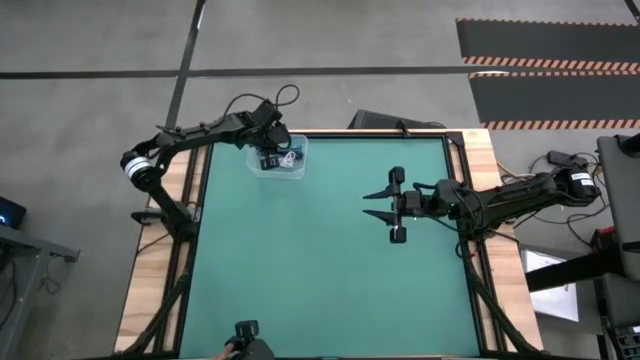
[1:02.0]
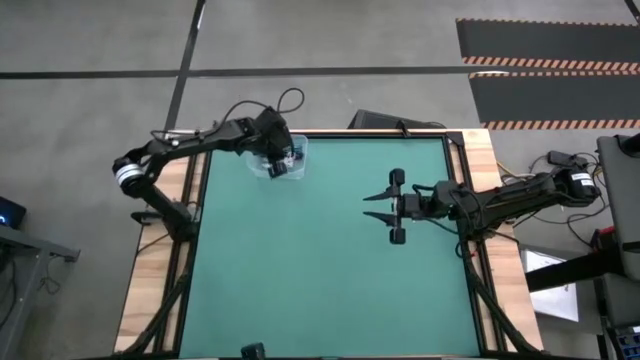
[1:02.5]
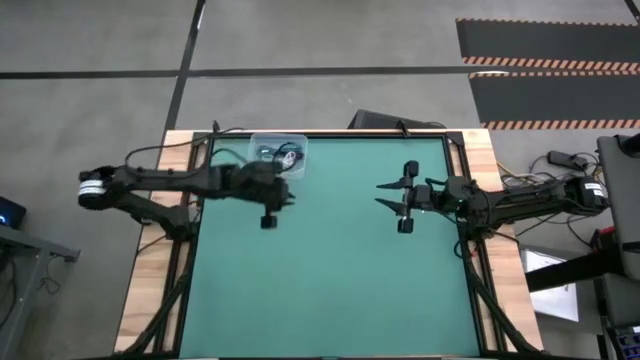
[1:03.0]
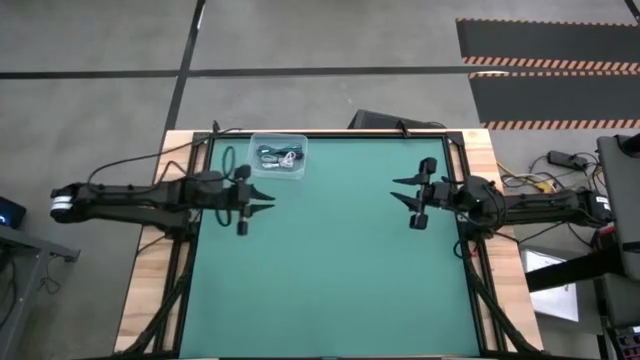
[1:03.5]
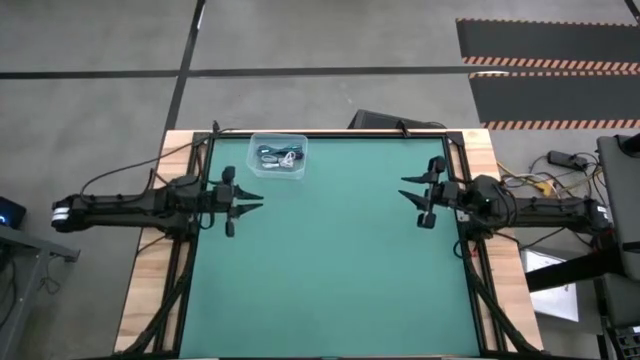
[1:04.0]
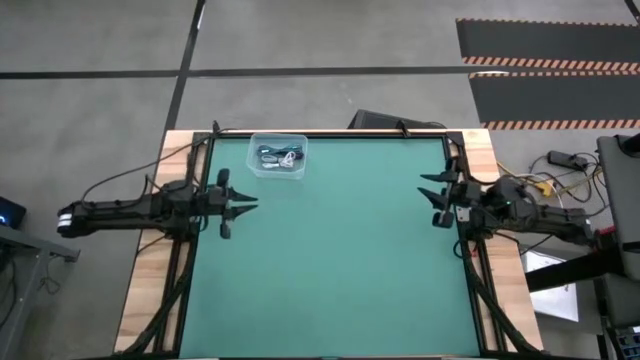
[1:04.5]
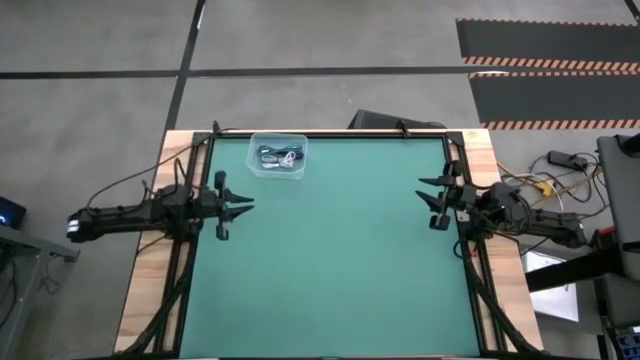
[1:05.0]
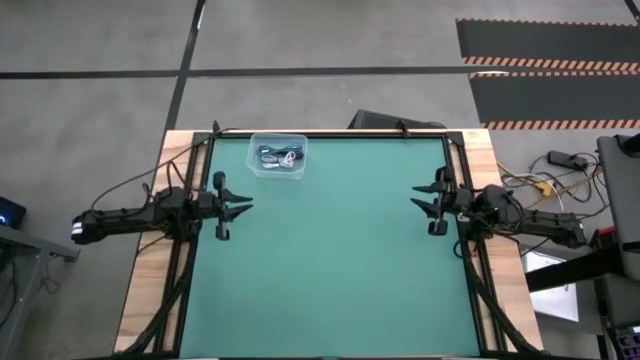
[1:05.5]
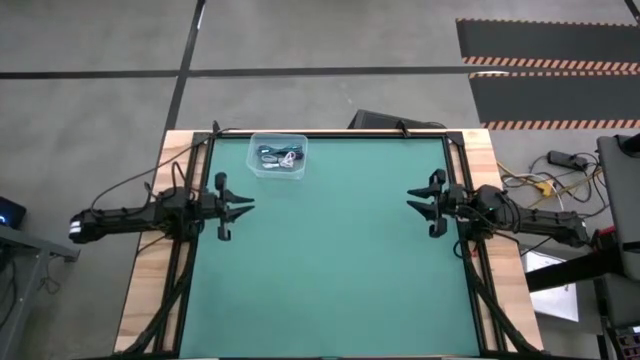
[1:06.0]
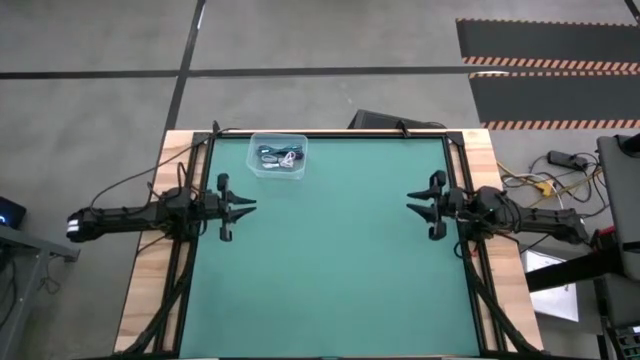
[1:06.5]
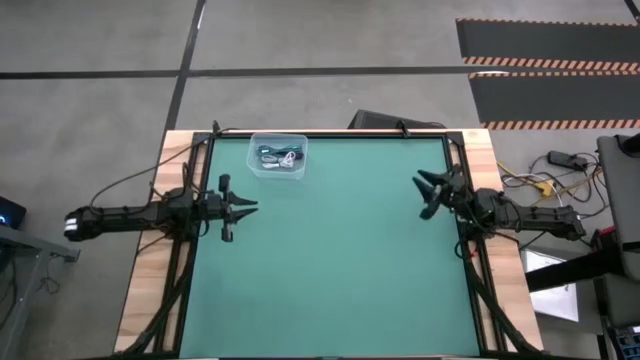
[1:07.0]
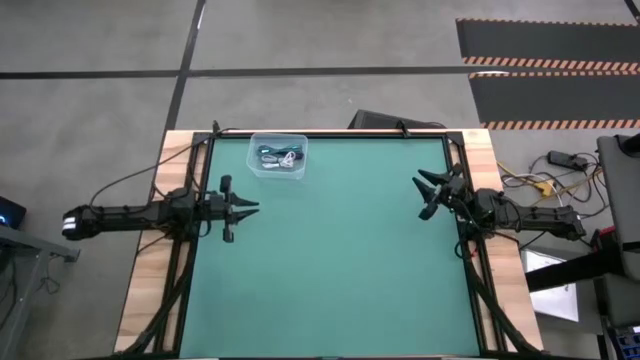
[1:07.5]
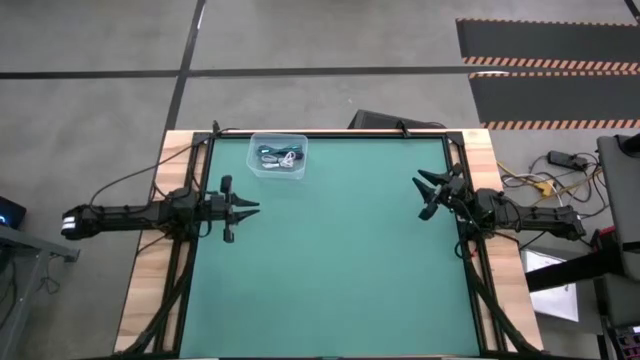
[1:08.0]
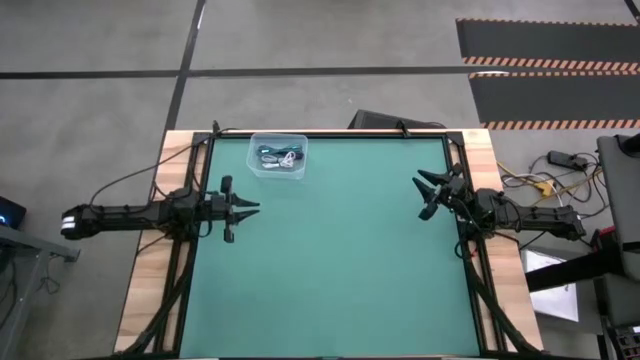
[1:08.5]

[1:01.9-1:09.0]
Task: Pick and place USB-C Cables
Return to Home Position

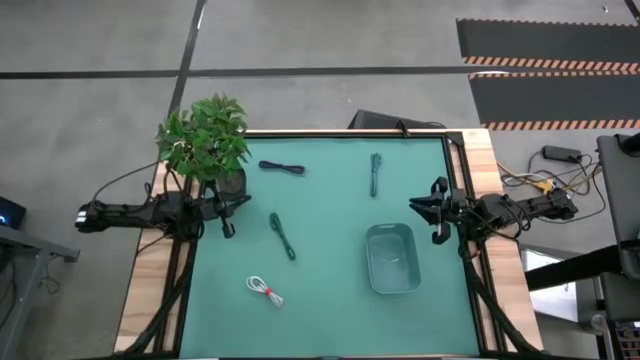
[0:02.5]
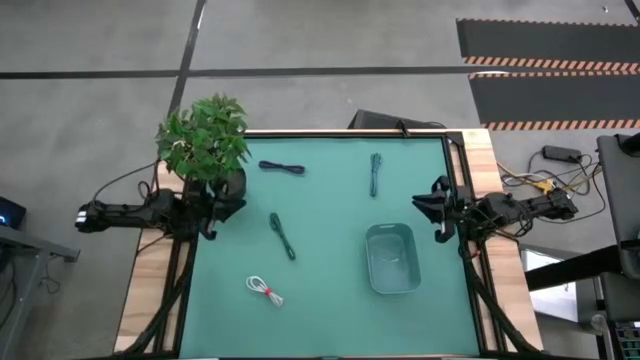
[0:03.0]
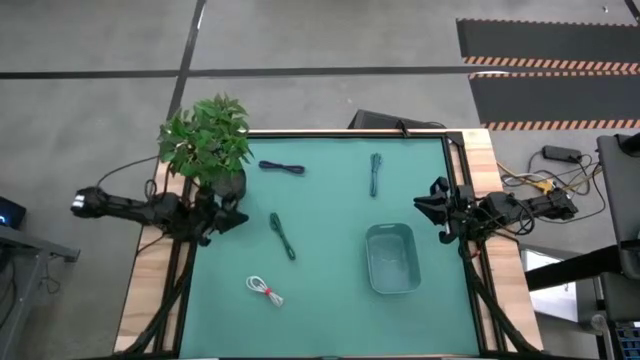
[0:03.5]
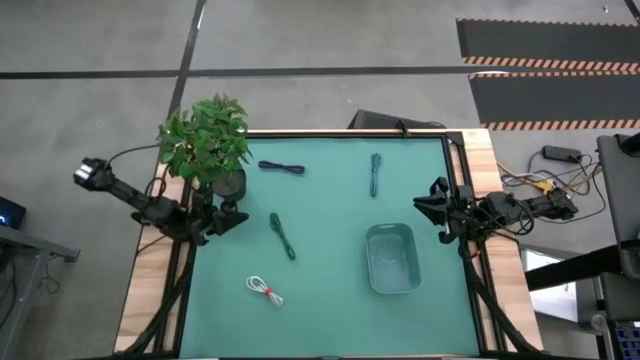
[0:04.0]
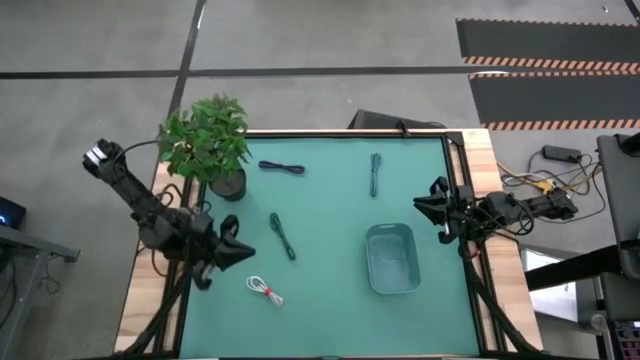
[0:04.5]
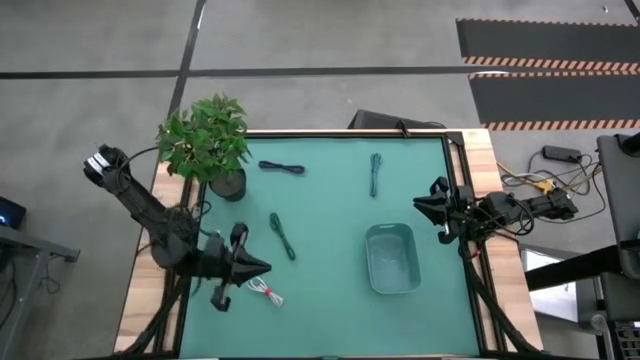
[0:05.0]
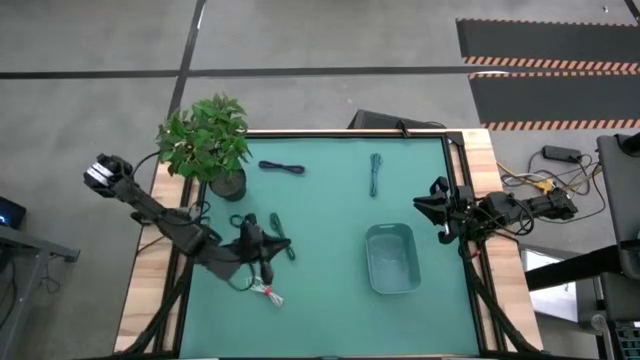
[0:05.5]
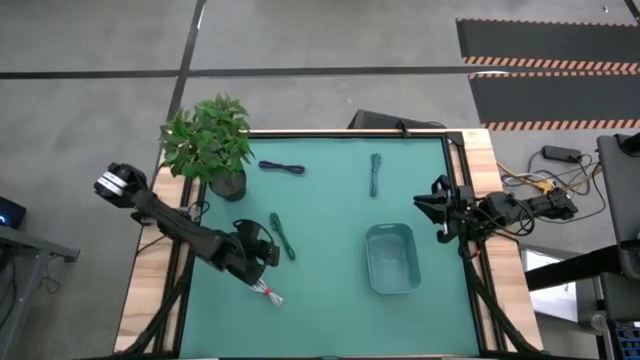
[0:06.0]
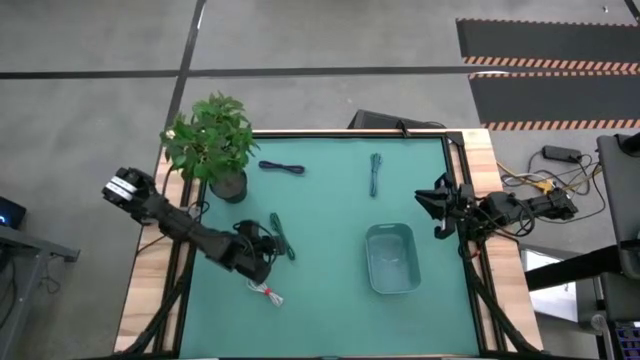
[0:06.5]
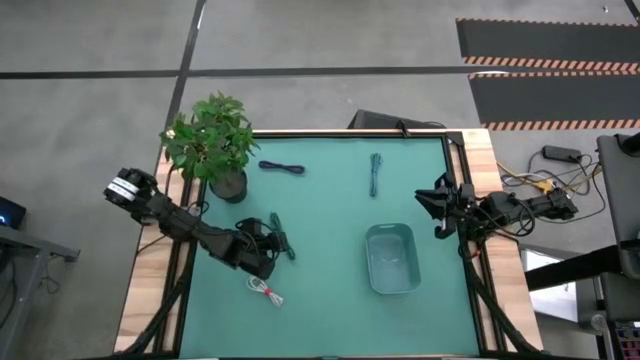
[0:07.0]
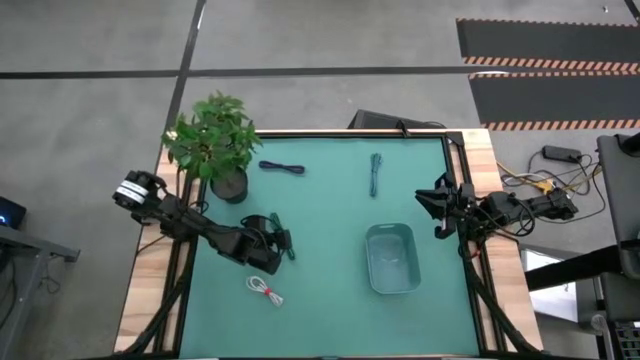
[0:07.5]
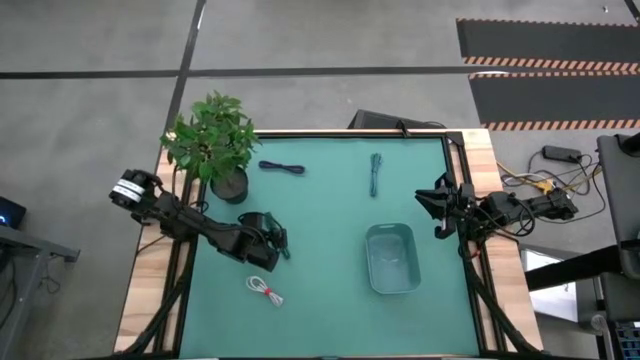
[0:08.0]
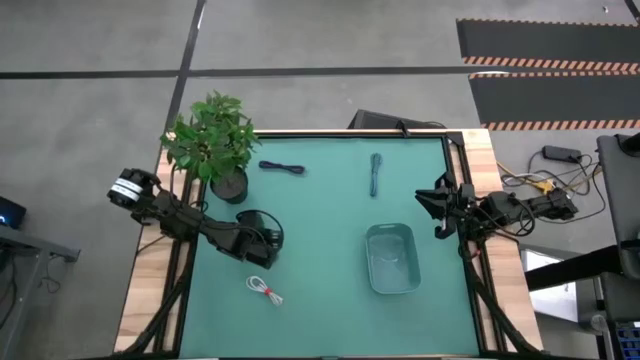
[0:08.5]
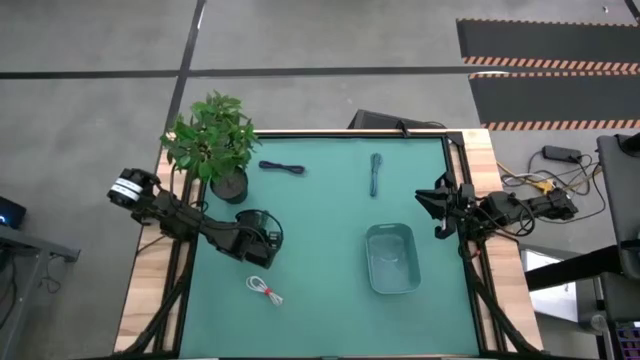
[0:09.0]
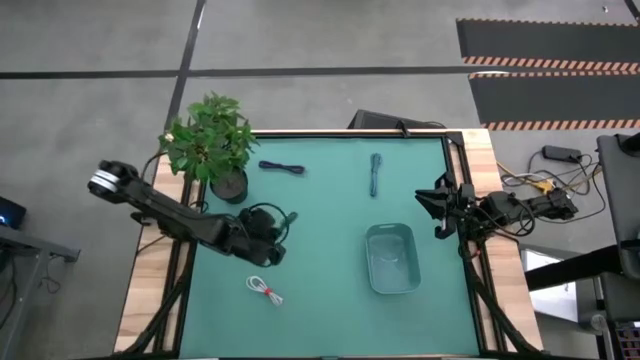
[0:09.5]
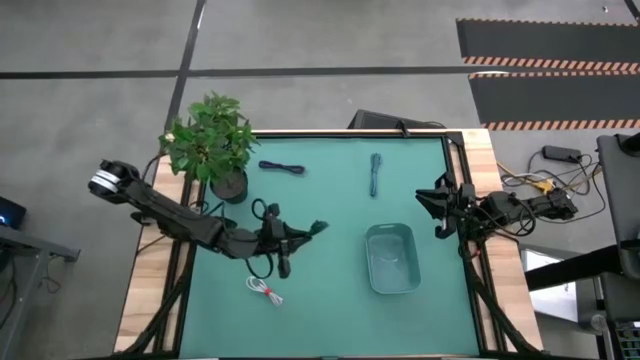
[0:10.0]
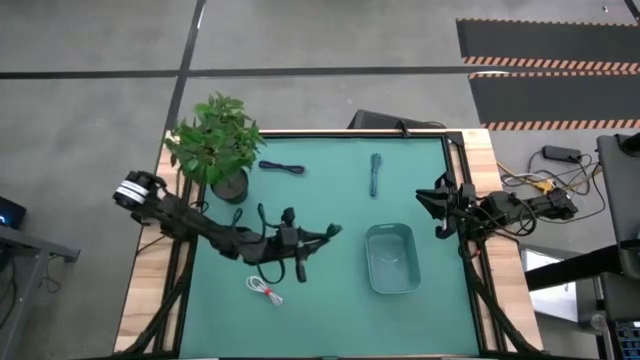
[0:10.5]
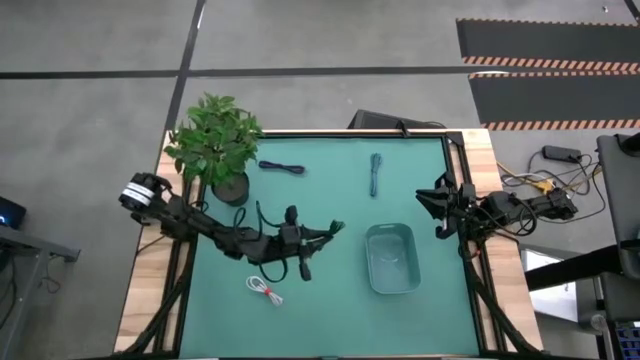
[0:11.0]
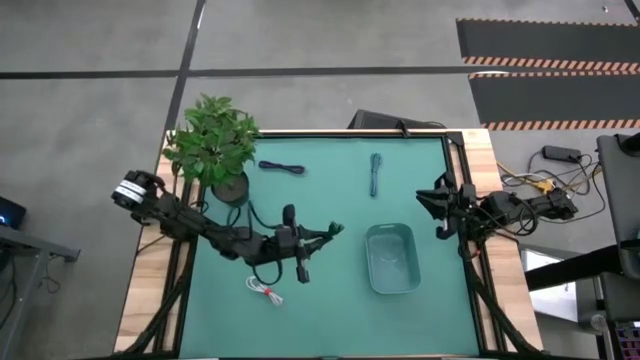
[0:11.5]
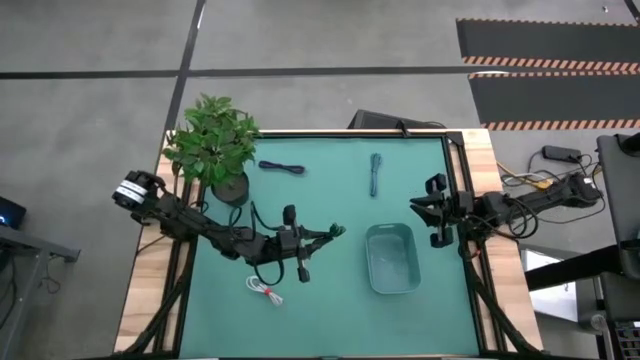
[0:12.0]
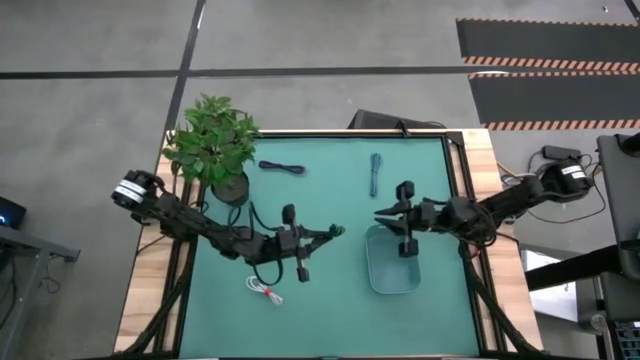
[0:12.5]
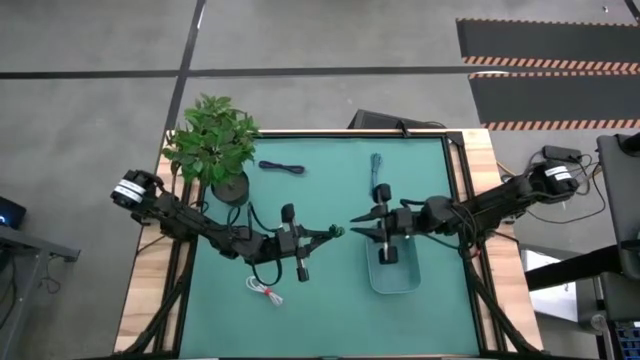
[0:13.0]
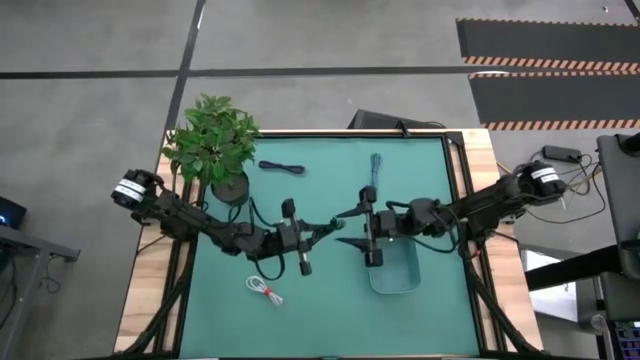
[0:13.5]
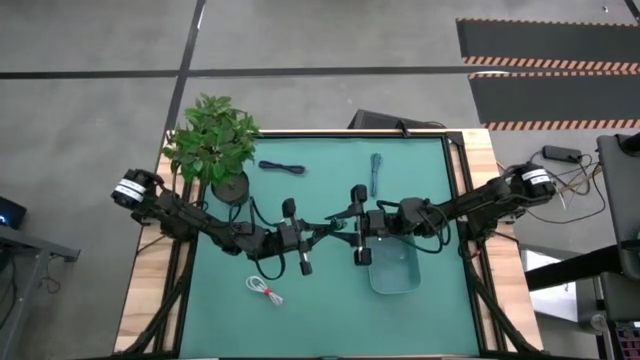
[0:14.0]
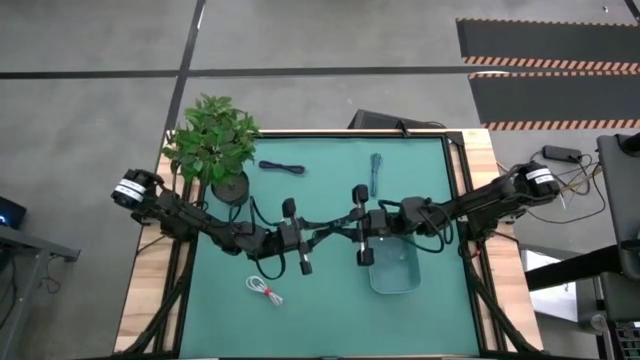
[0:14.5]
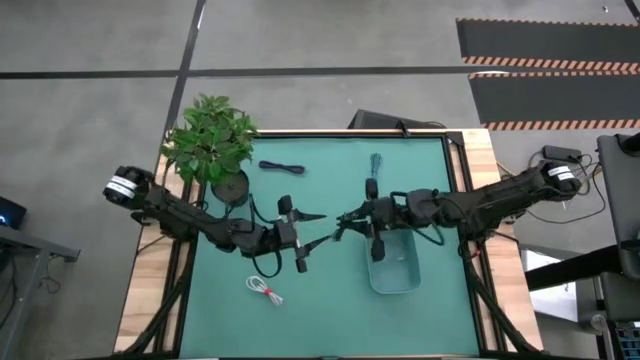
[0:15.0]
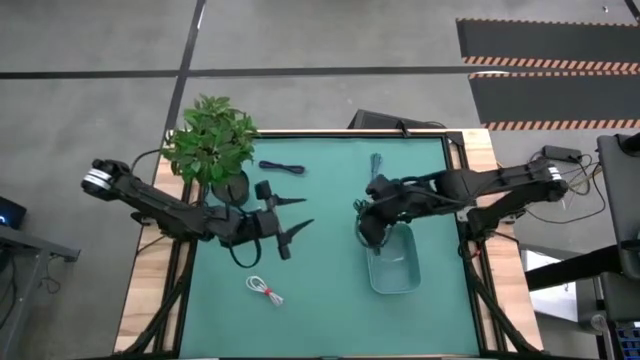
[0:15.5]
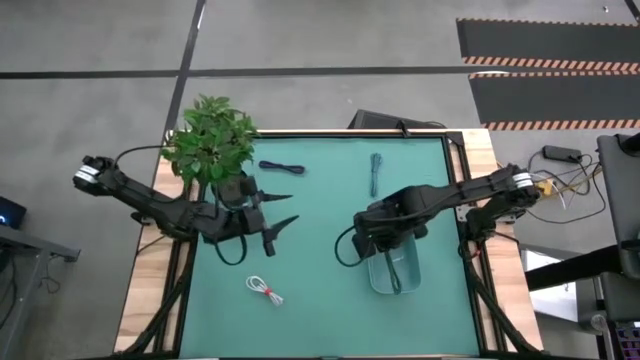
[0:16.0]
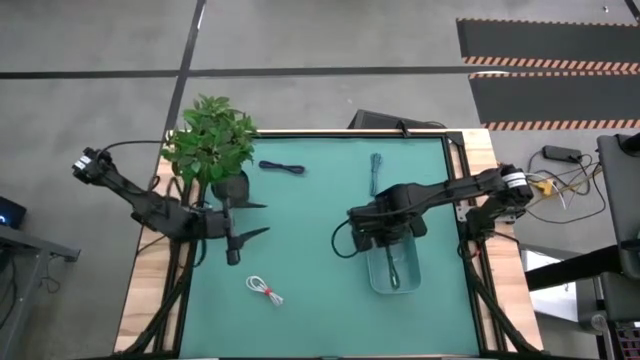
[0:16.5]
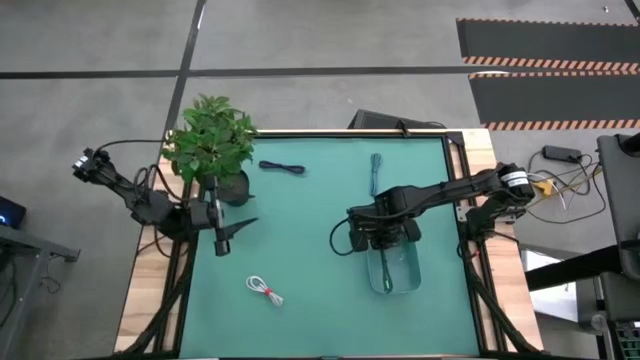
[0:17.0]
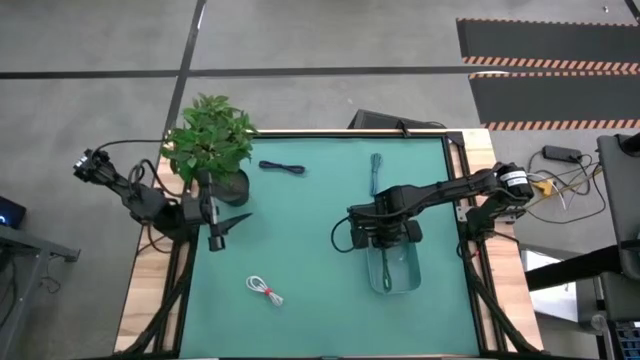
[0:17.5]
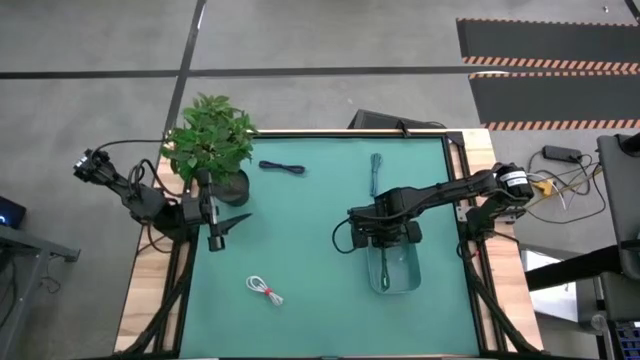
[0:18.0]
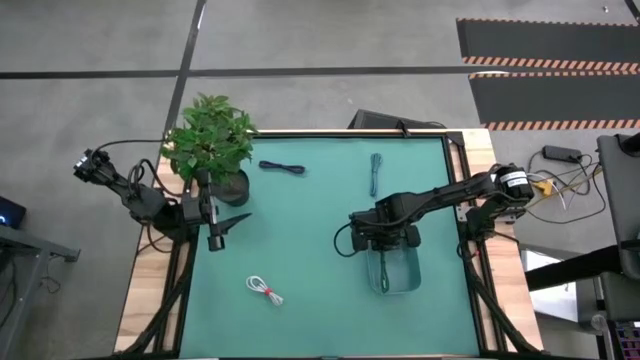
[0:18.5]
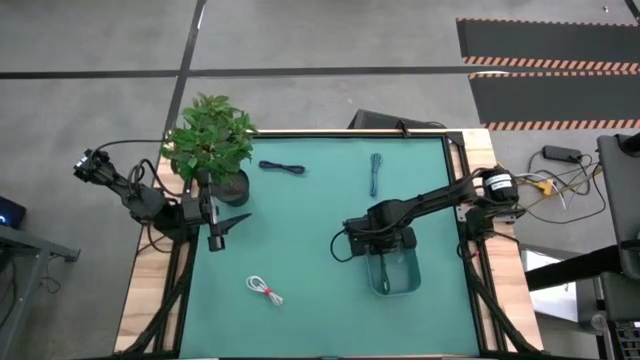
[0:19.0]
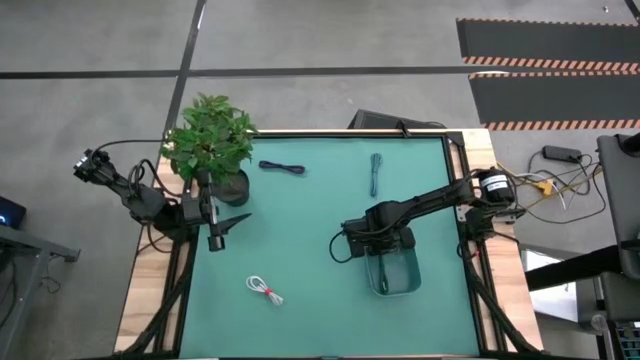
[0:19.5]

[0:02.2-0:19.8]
Task: Pick and place USB-C Cables
Put the green charger cable into the blue bin
